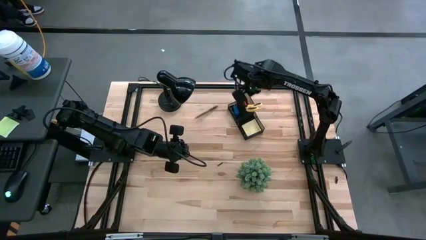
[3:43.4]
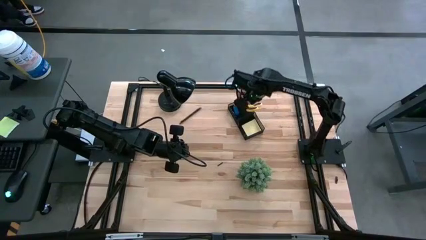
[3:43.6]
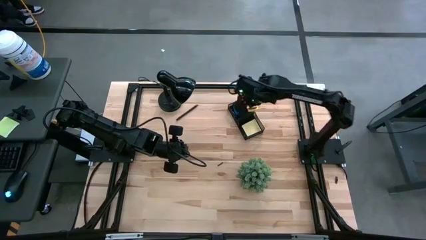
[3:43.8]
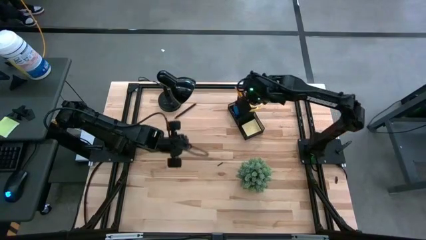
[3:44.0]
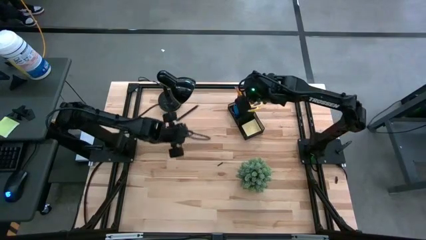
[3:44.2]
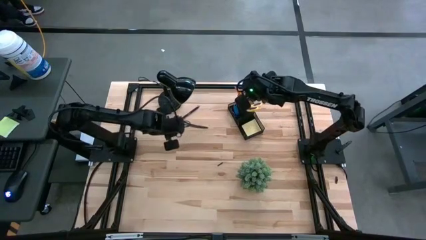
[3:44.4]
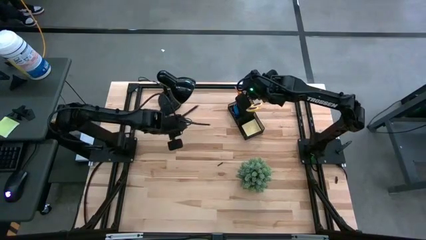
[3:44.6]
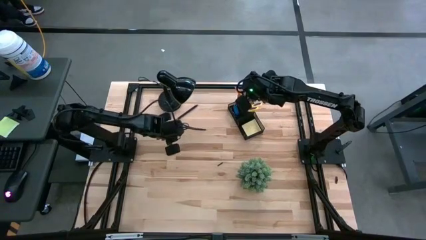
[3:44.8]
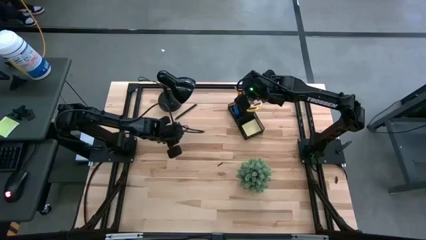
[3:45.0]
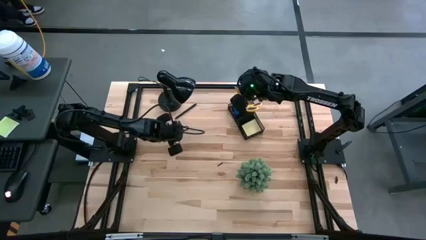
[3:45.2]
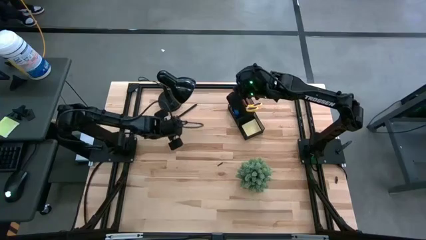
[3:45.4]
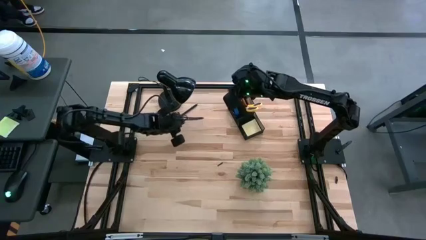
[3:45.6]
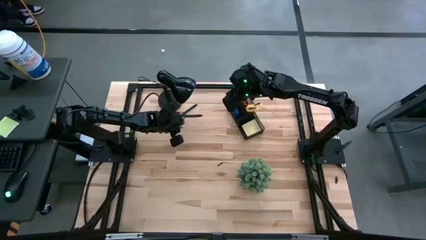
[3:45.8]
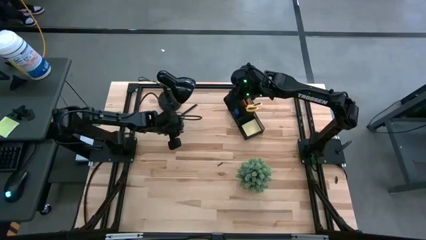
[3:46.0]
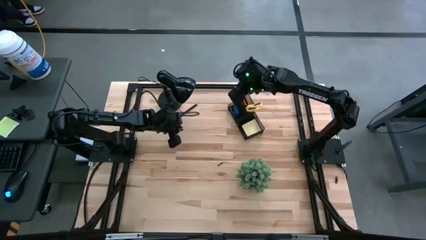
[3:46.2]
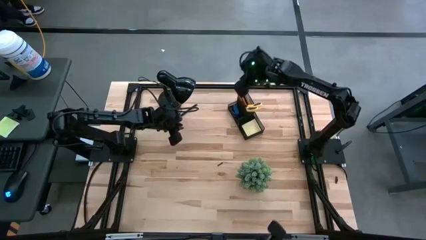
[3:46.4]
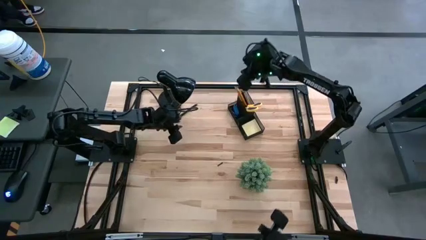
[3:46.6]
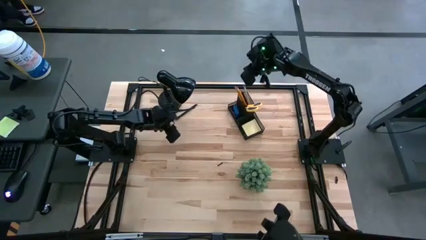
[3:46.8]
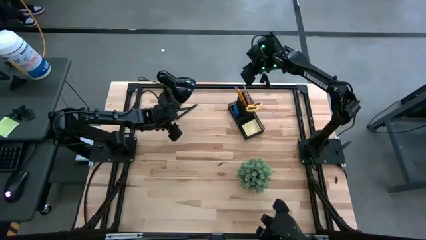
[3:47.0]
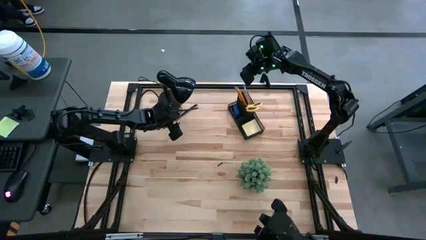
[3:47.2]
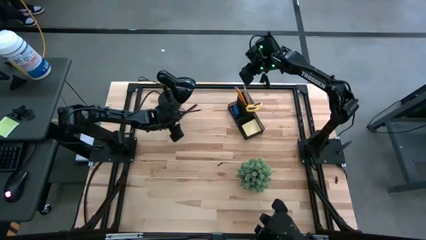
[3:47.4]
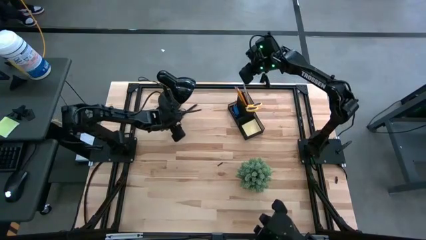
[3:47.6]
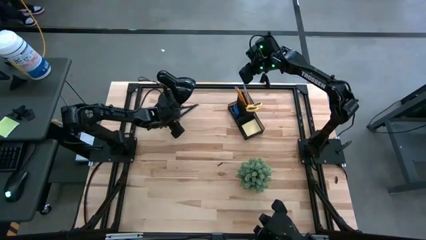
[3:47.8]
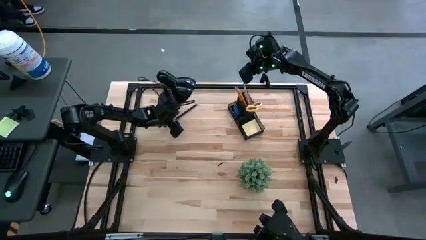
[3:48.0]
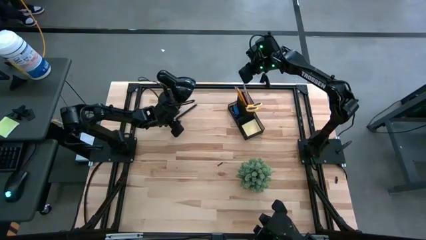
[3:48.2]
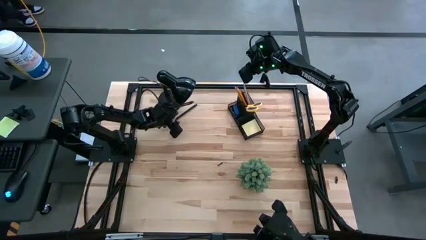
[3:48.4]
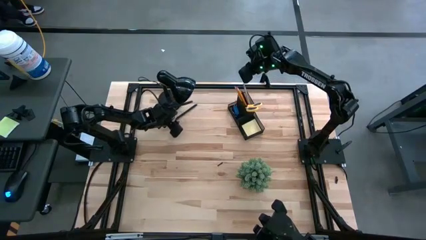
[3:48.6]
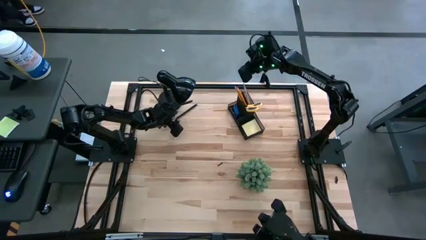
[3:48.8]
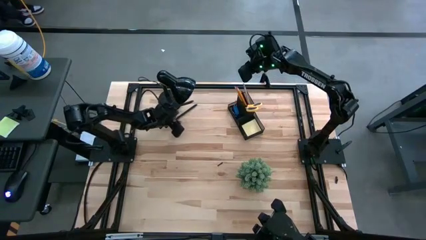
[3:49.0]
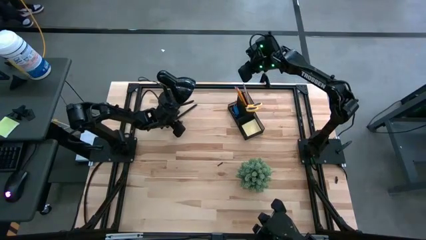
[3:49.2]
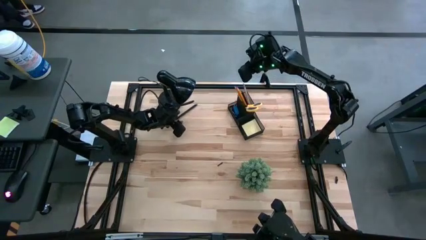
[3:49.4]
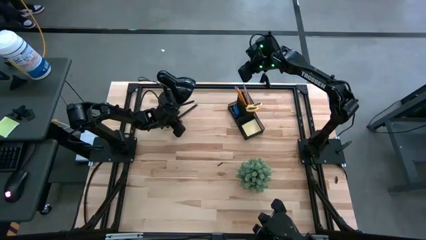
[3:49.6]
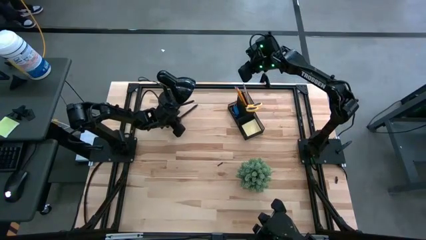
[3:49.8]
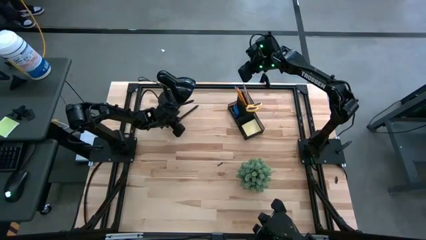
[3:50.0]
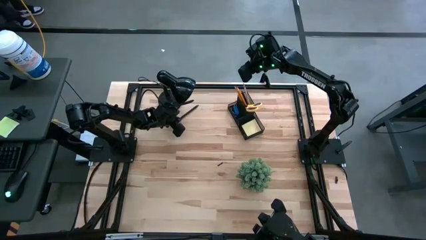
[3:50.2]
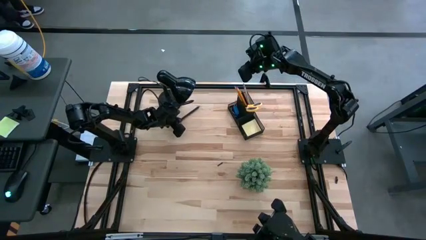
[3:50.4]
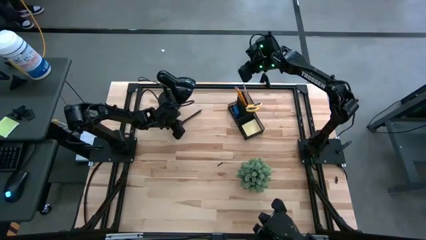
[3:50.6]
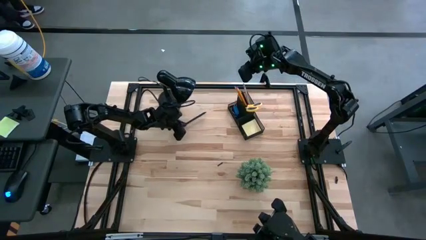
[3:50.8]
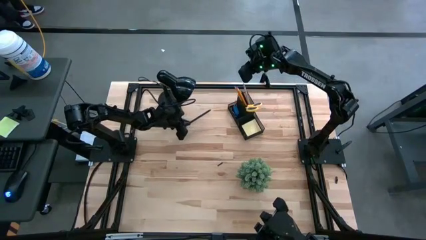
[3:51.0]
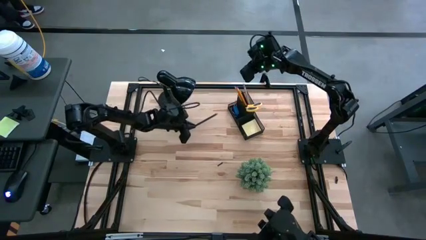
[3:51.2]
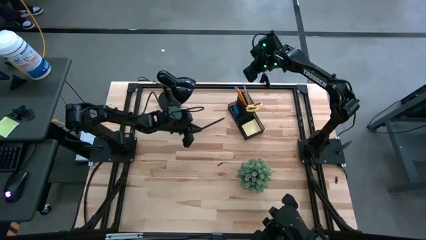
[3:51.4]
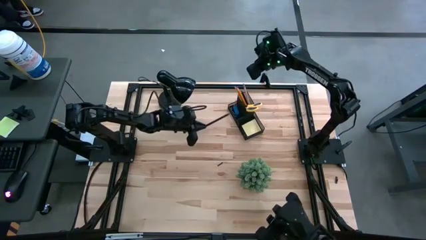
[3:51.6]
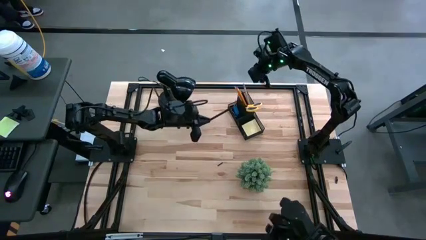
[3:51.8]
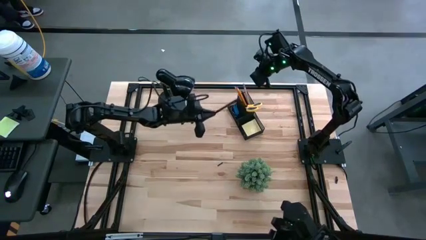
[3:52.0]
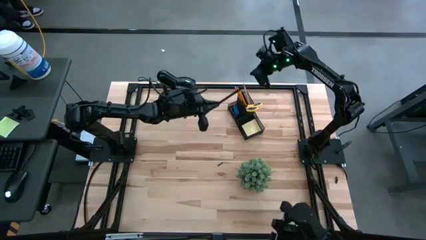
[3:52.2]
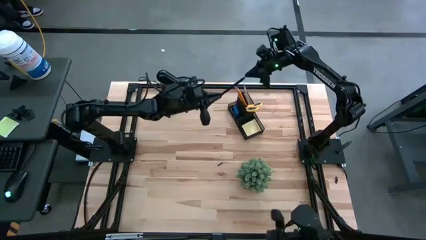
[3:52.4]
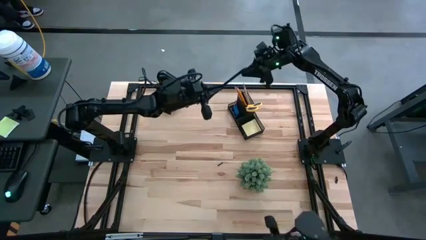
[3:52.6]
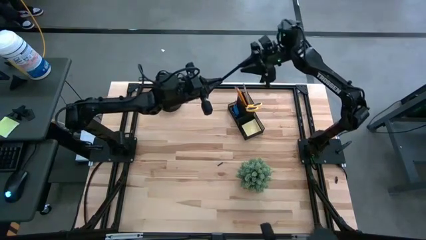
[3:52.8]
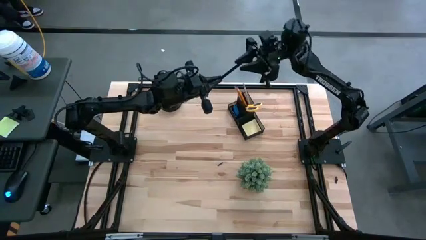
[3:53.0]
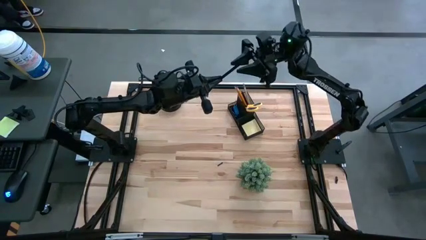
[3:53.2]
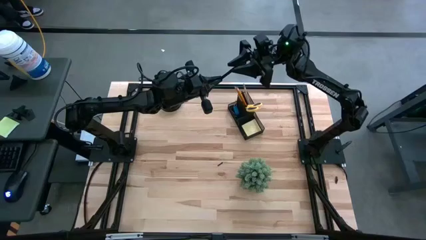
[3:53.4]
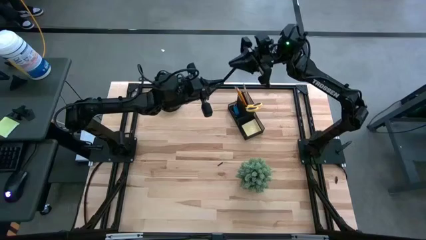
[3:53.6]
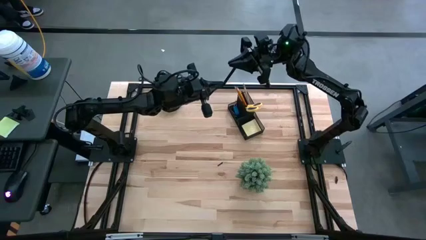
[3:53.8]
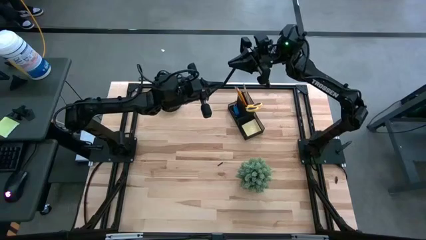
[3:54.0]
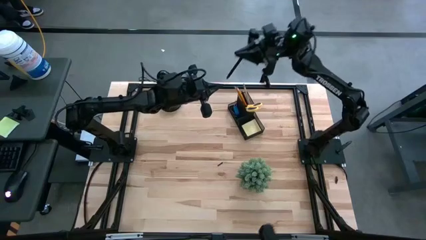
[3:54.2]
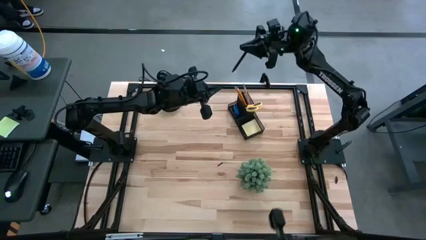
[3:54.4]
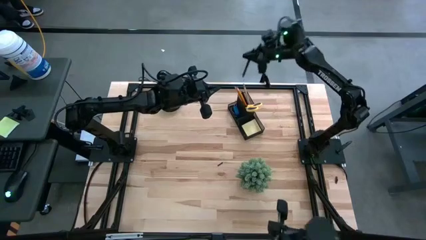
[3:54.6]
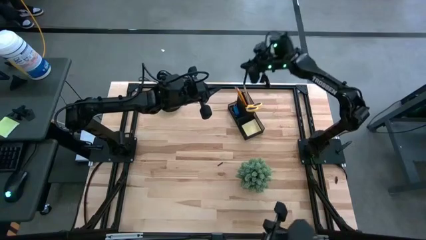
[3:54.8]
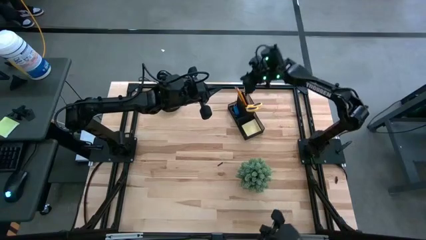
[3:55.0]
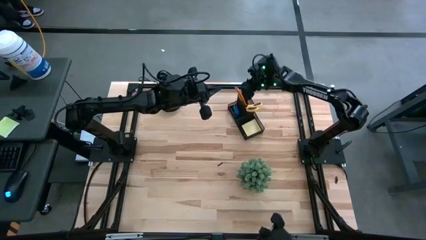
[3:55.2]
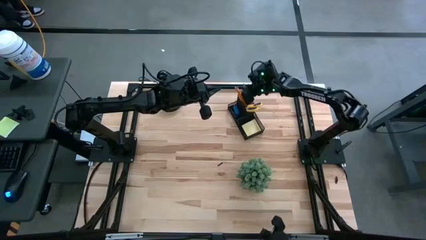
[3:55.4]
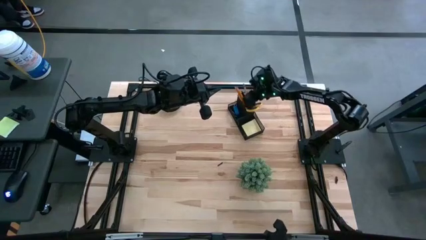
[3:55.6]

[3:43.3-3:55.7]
Task: Pick and place office supplies into organizer
Put the black pen into the desk organizer

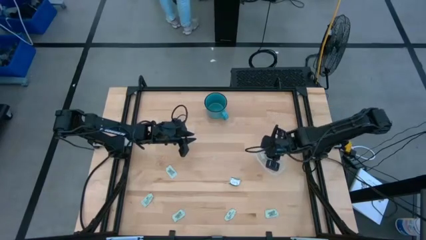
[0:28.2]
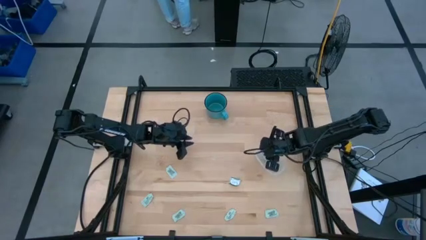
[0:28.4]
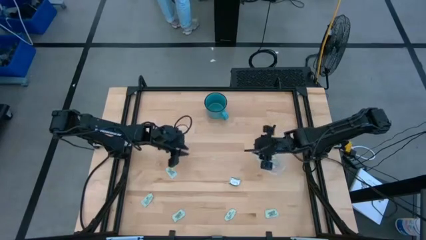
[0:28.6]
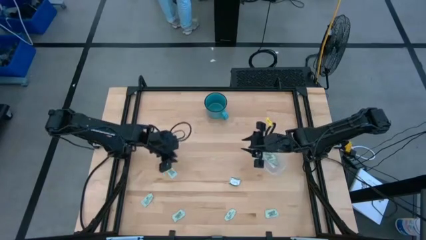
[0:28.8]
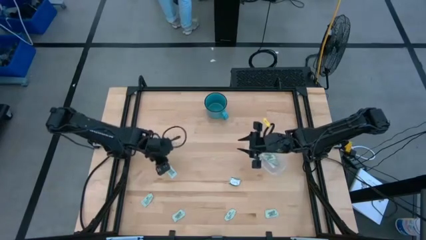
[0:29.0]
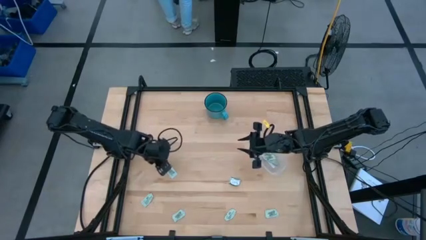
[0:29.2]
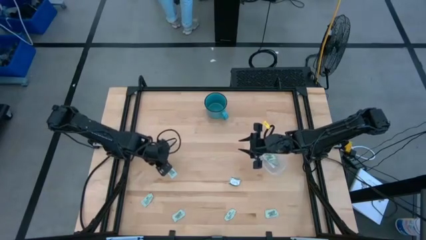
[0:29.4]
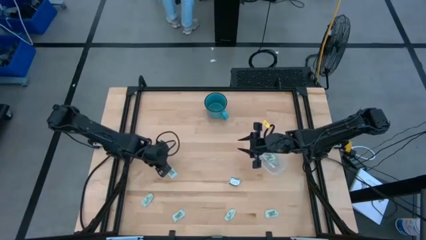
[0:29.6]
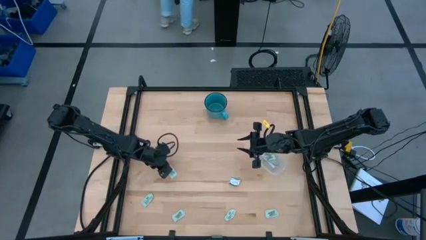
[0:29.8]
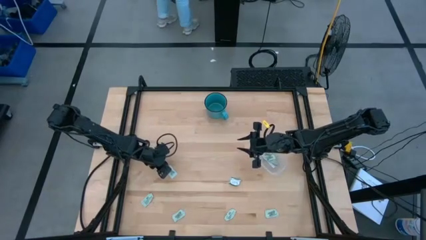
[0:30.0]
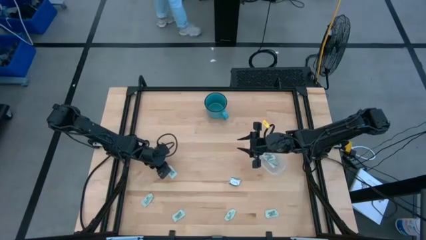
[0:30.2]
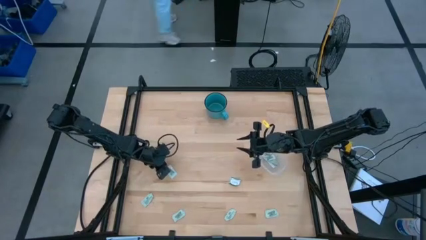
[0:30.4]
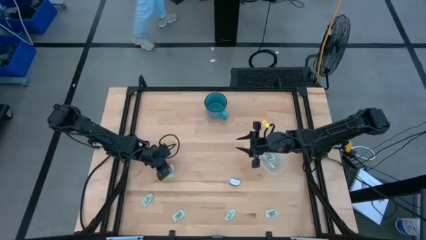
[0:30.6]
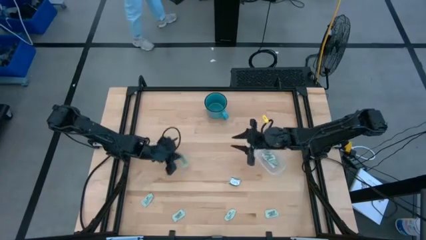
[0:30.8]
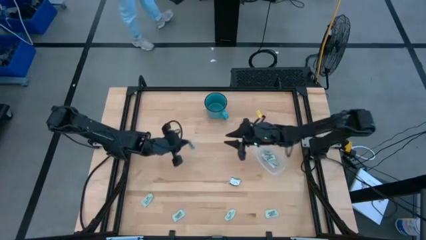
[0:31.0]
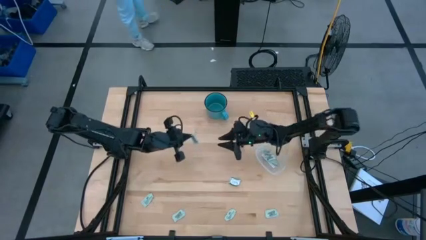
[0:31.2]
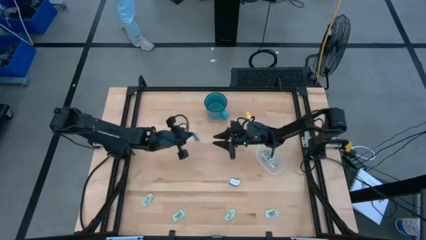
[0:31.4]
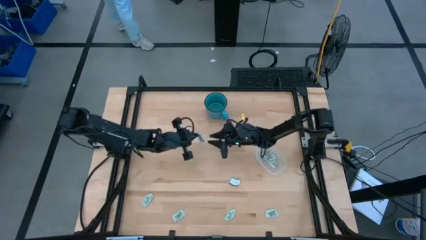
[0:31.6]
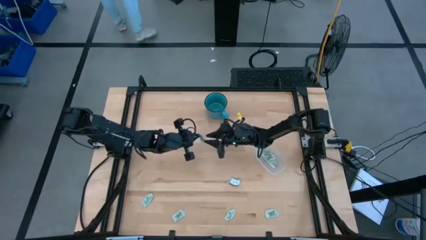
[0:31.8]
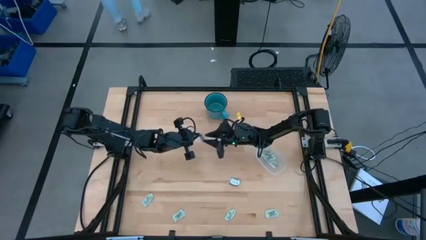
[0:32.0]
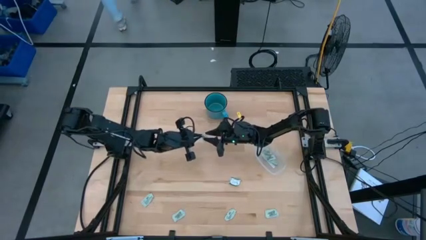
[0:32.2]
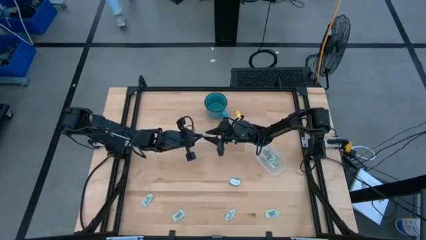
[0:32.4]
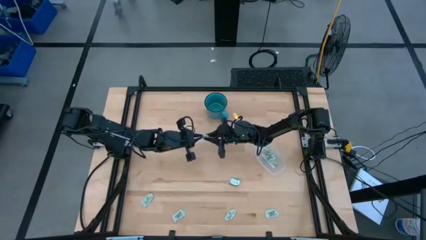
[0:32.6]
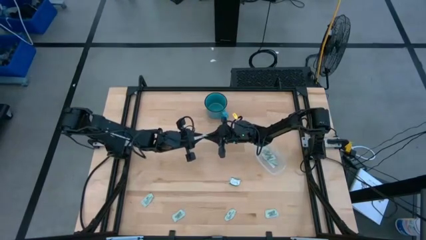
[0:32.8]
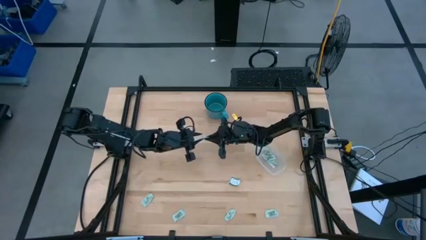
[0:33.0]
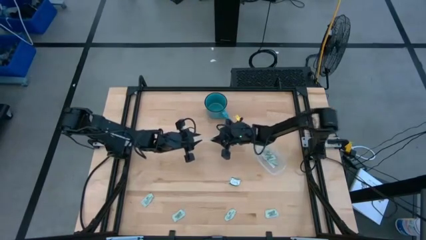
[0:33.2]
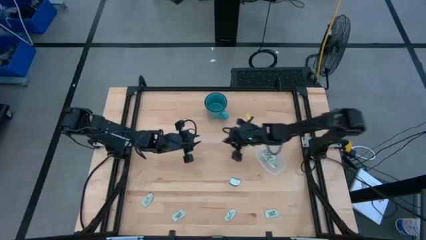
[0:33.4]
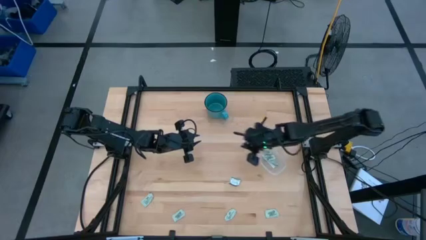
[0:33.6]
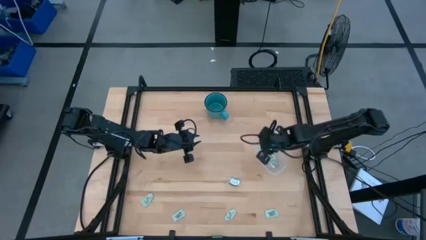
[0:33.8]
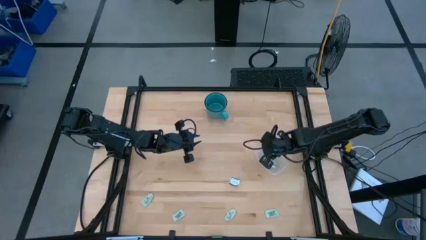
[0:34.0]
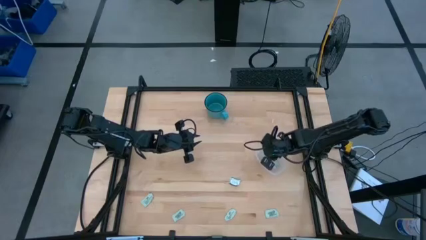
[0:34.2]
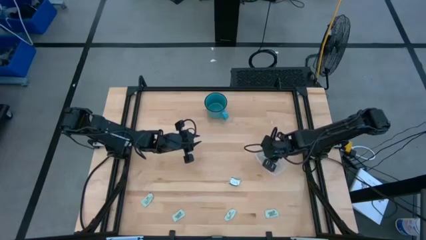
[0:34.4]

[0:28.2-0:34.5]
Task: Pick and place Stevia / Truvia into bins
Put the white stevia packet into the transparent container
